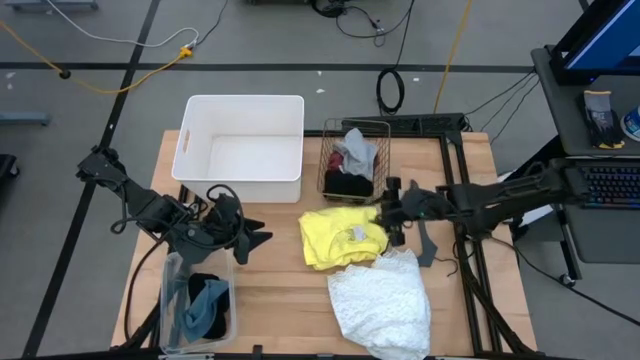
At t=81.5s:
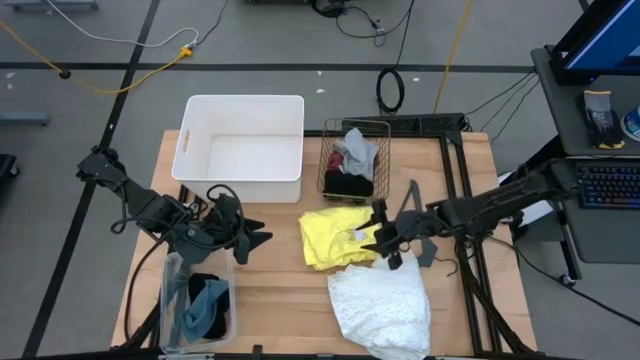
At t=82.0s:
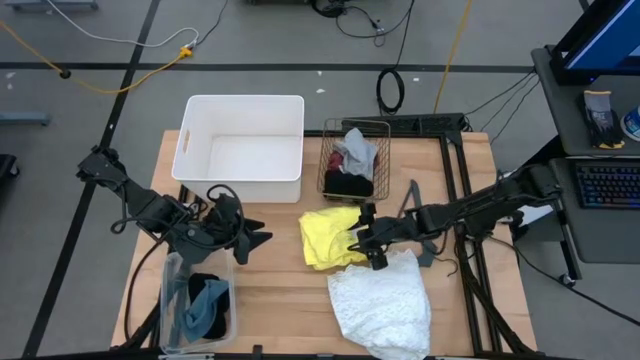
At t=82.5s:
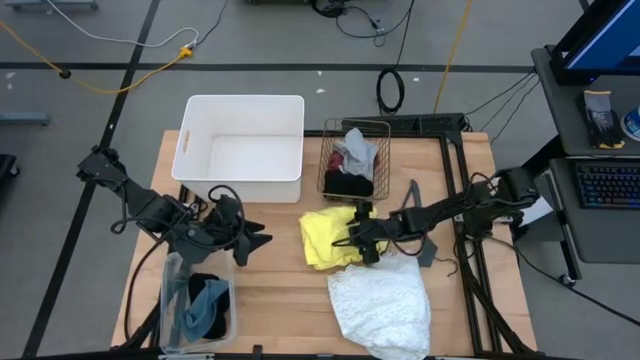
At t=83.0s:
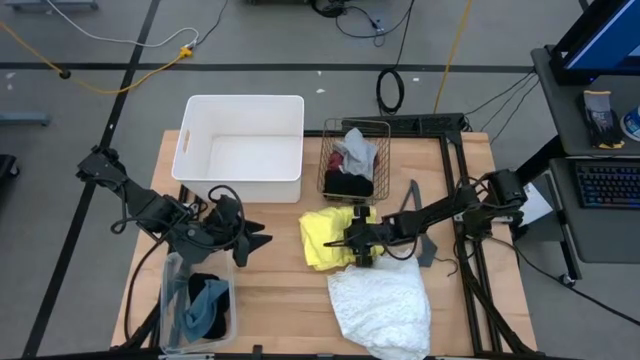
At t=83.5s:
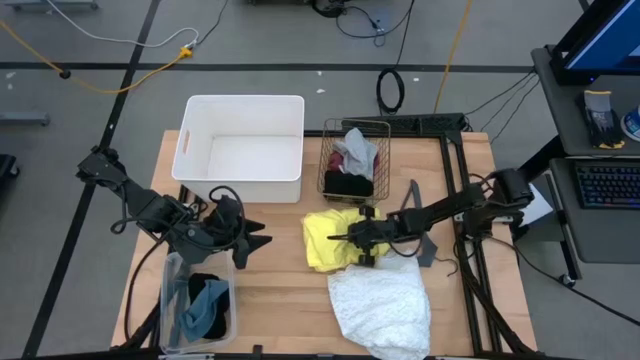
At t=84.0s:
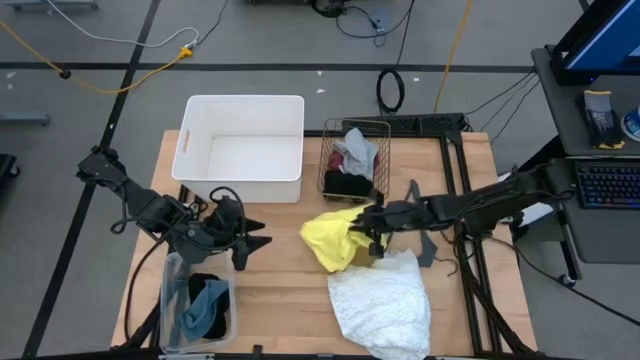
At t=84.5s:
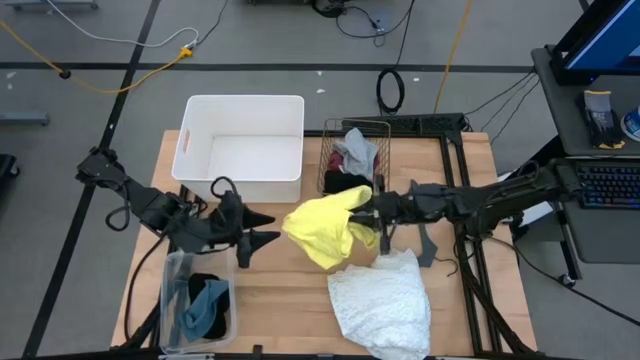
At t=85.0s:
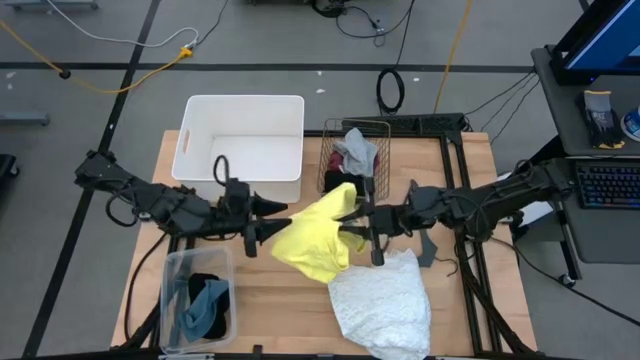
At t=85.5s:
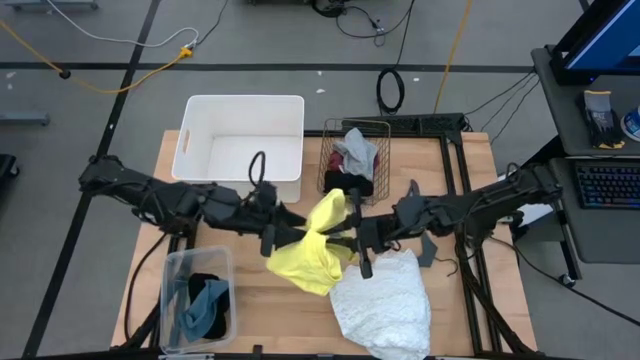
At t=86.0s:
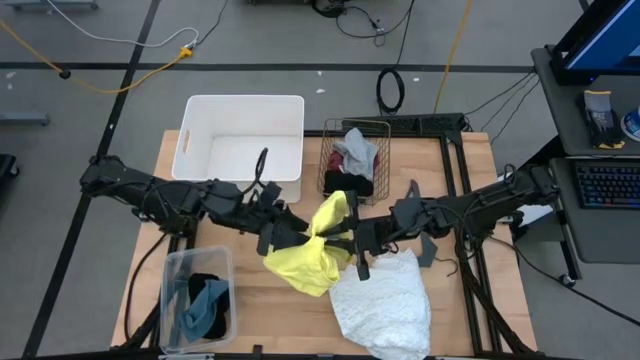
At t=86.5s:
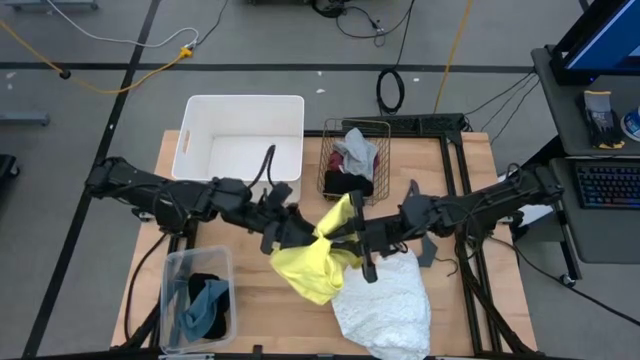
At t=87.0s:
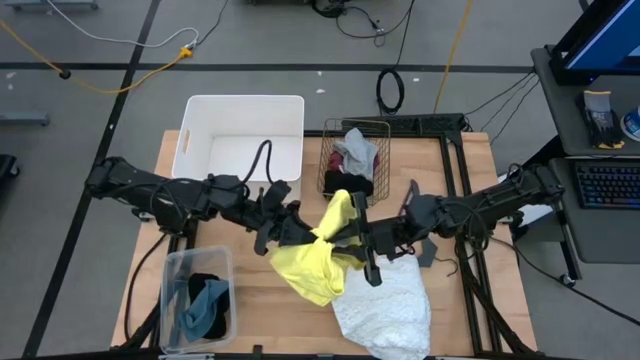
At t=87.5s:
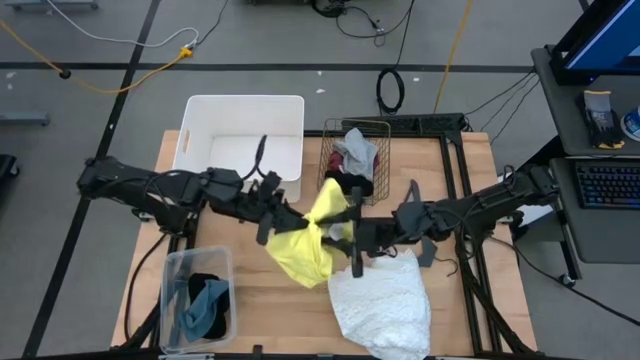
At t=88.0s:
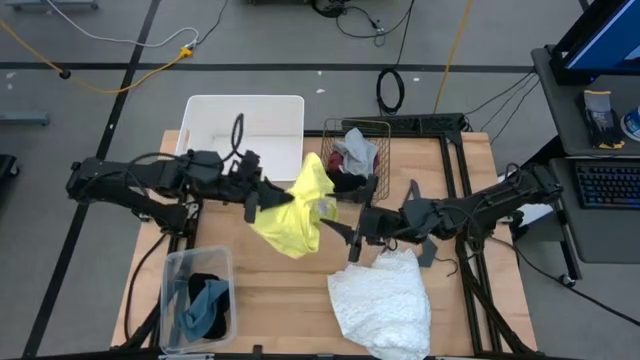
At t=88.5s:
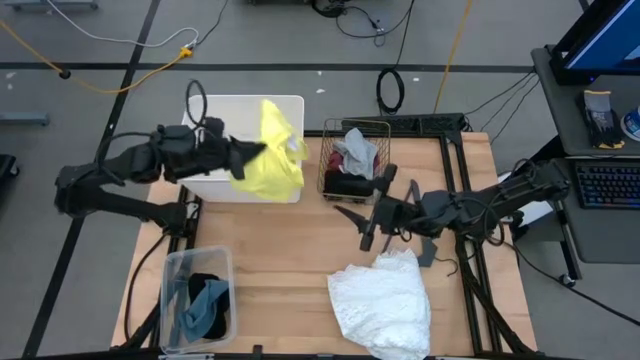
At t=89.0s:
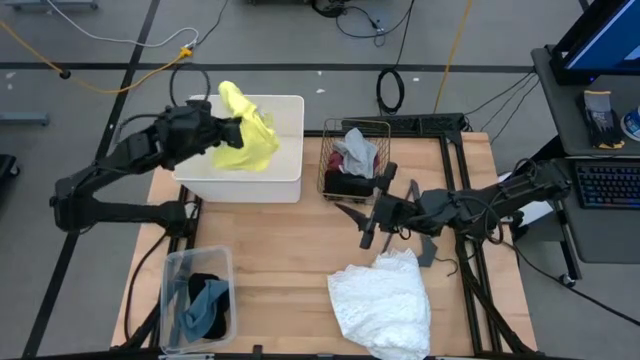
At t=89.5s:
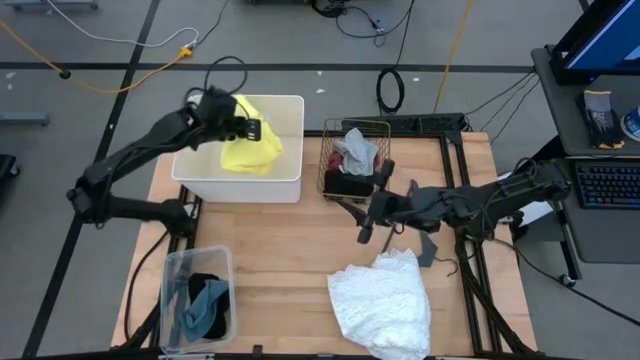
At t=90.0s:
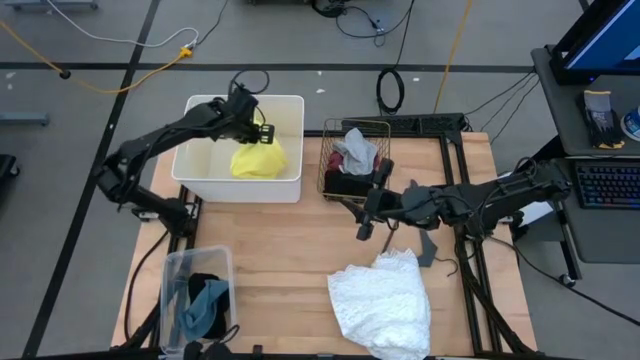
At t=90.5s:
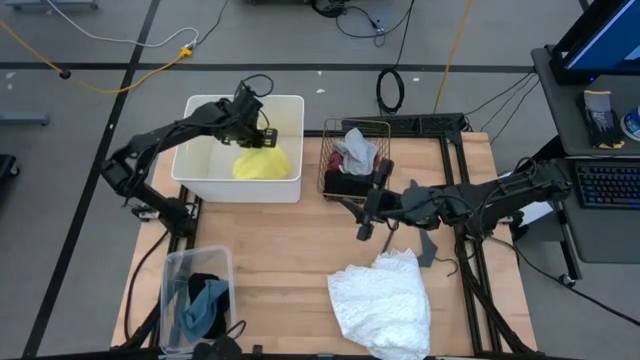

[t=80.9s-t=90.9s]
Task: Pick & Place Cloths
Put the yellow sweater into the white bin

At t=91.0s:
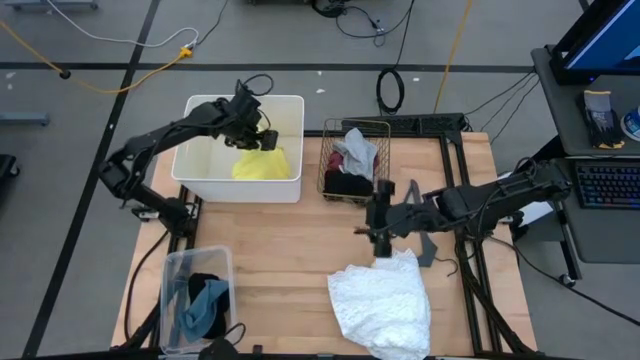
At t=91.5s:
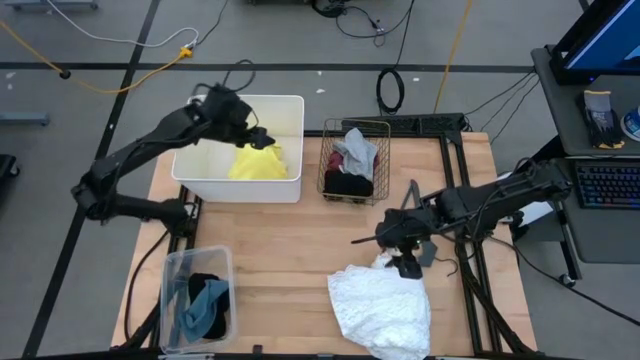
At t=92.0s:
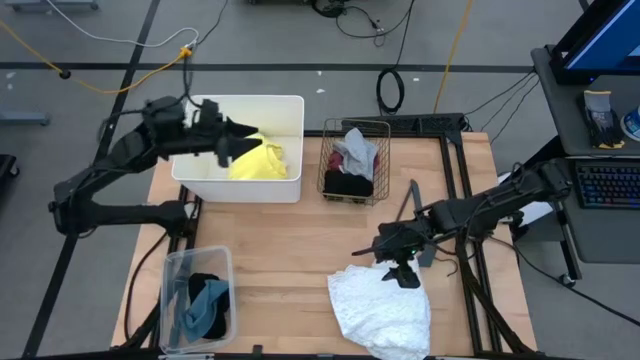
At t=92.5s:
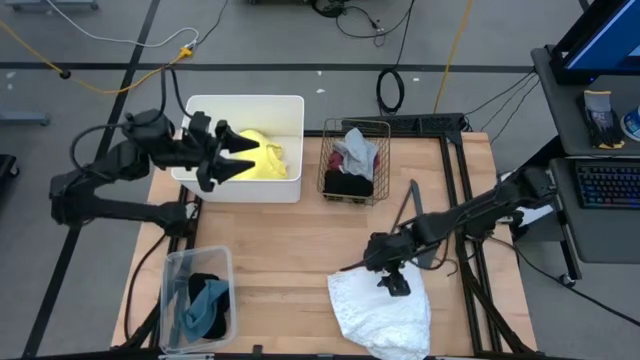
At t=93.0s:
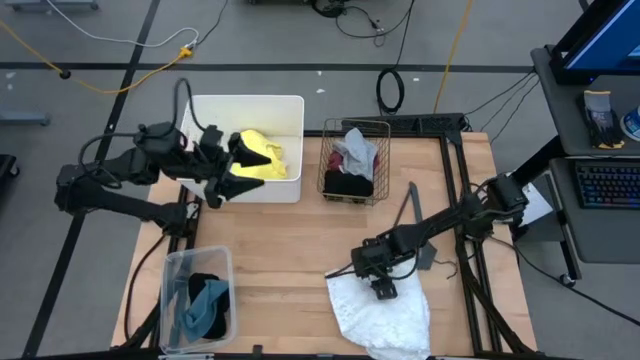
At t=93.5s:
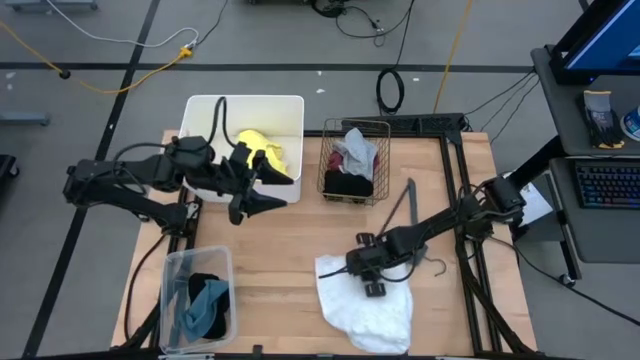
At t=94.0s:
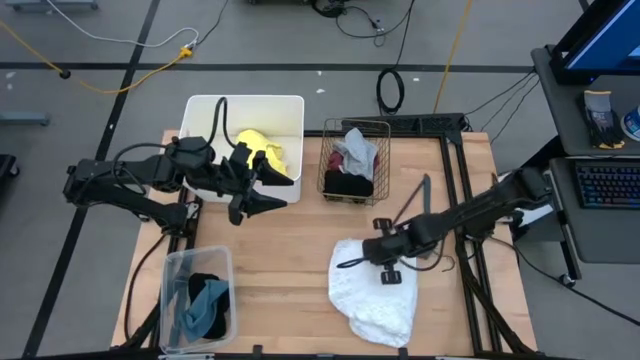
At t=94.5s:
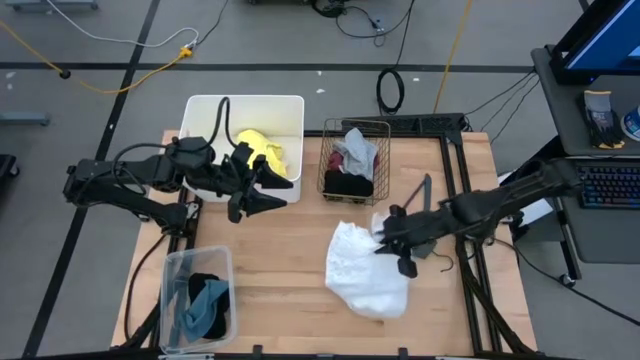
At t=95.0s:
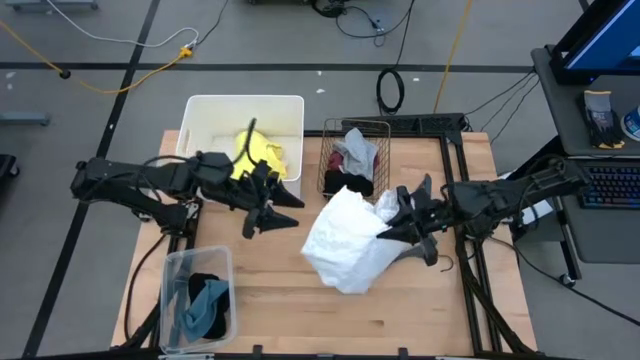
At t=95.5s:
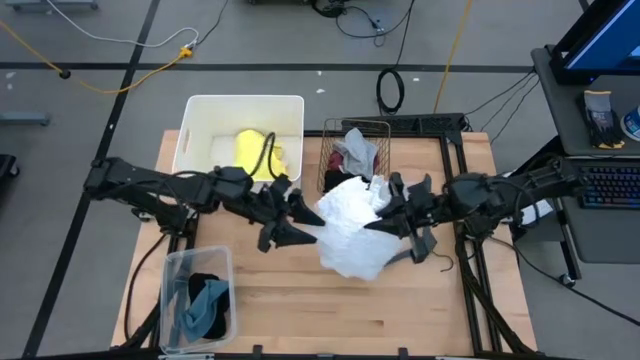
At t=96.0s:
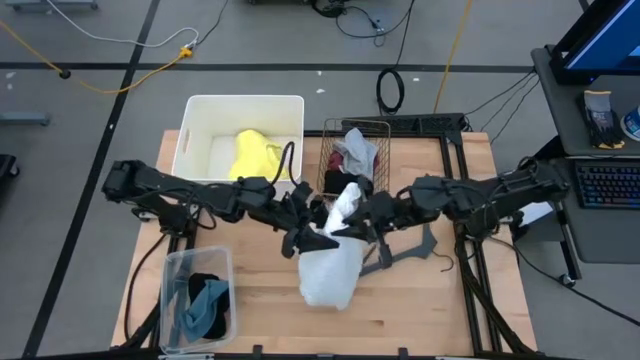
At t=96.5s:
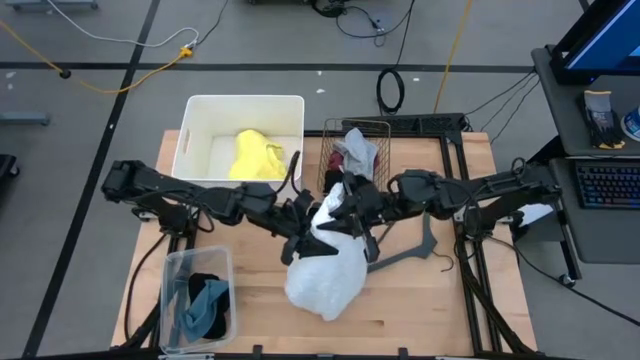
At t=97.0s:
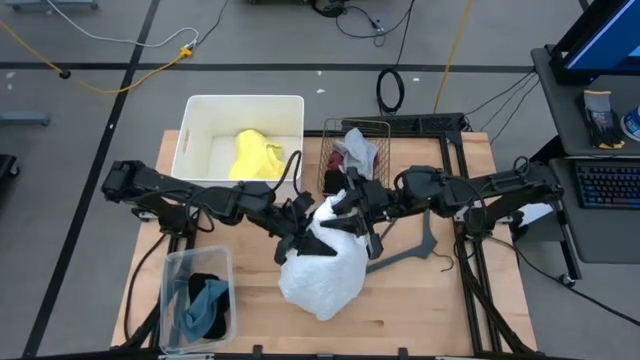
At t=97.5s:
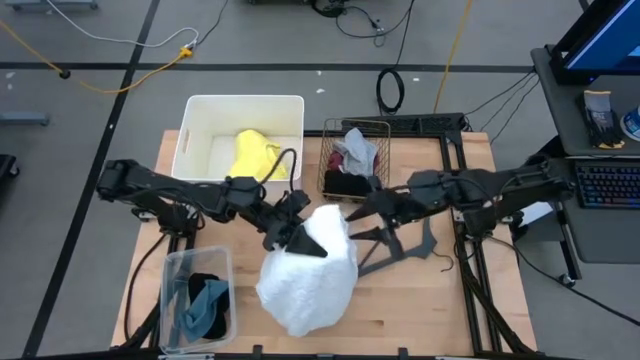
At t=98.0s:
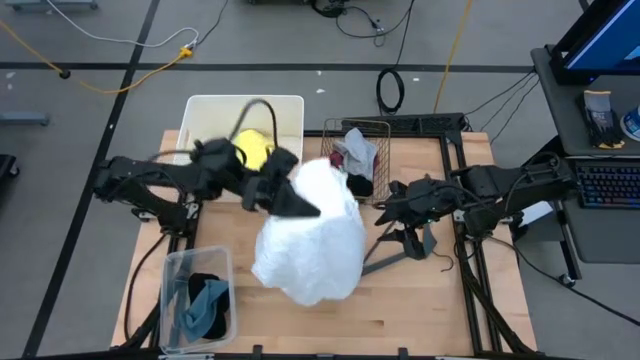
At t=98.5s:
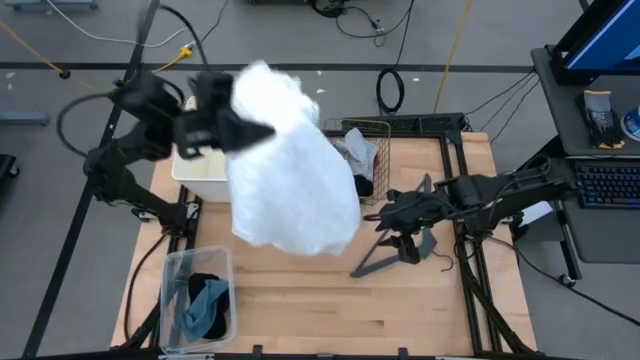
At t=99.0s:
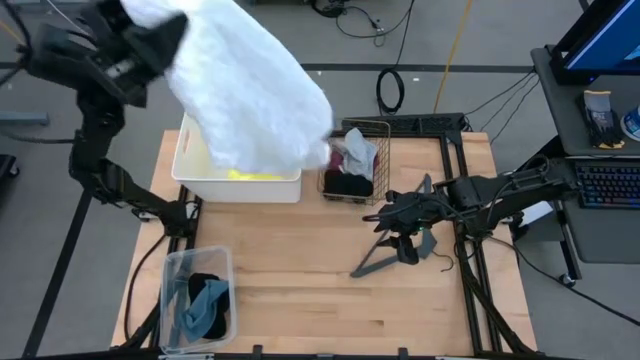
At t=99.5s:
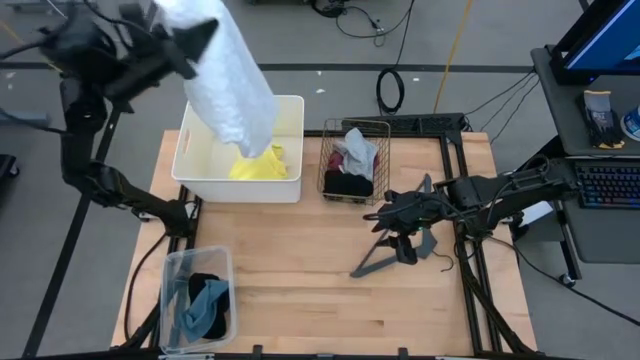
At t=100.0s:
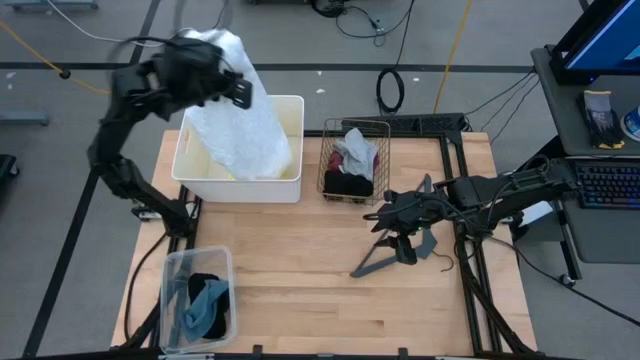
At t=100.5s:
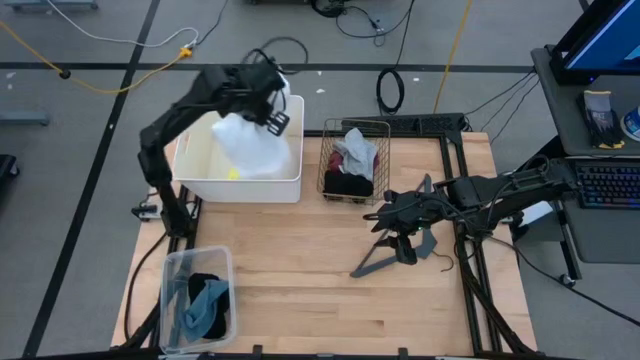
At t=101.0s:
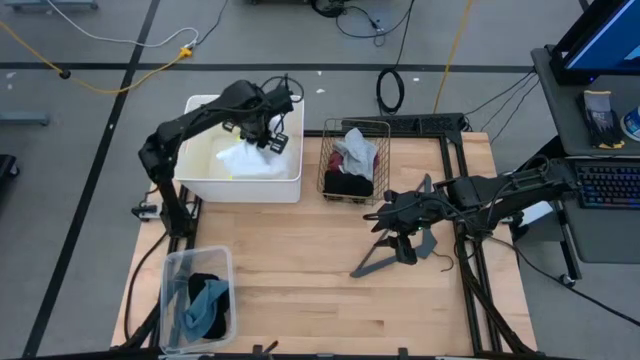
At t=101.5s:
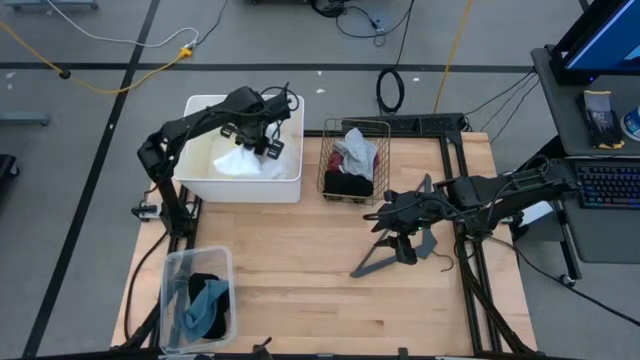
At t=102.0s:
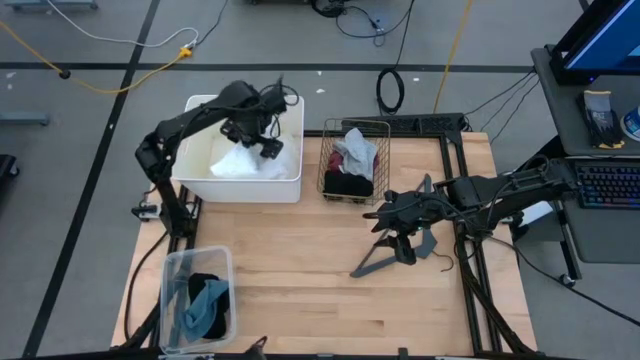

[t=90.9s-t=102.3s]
Put the white sweater into the white bin
